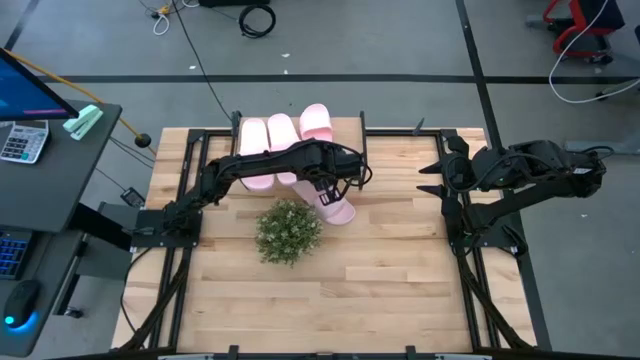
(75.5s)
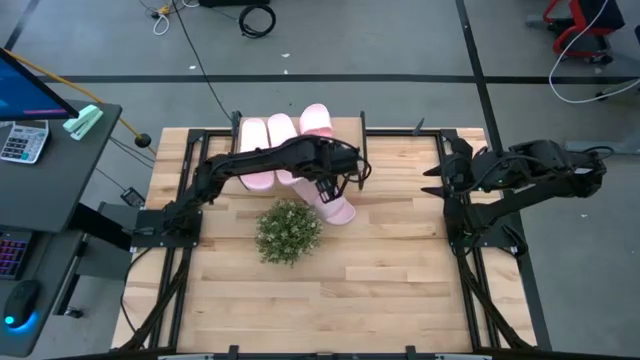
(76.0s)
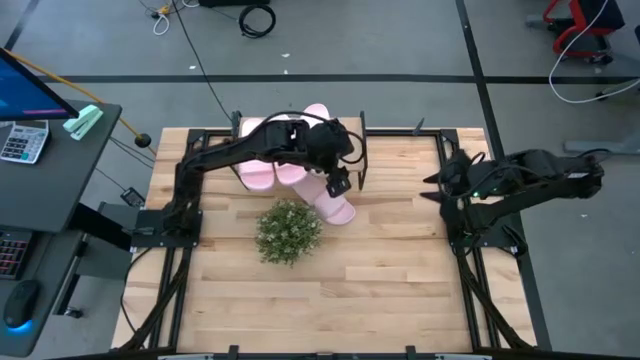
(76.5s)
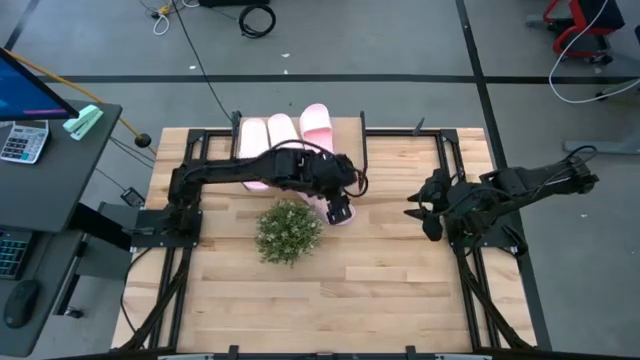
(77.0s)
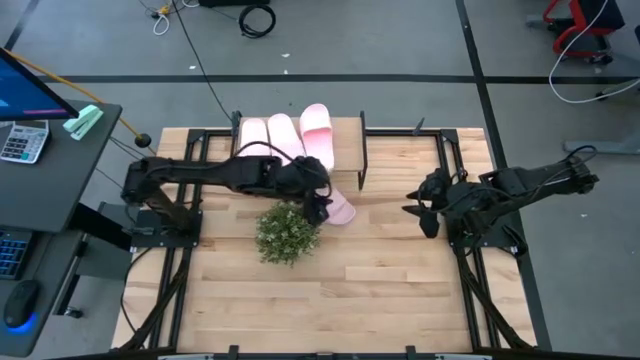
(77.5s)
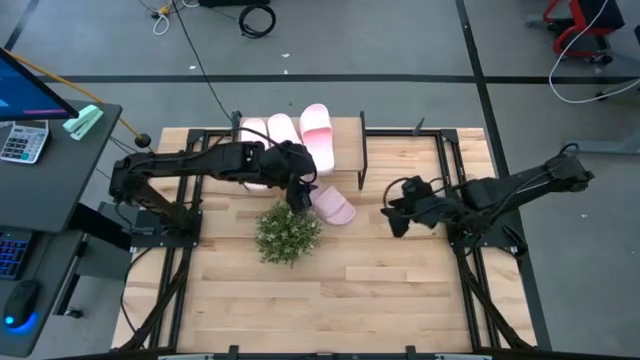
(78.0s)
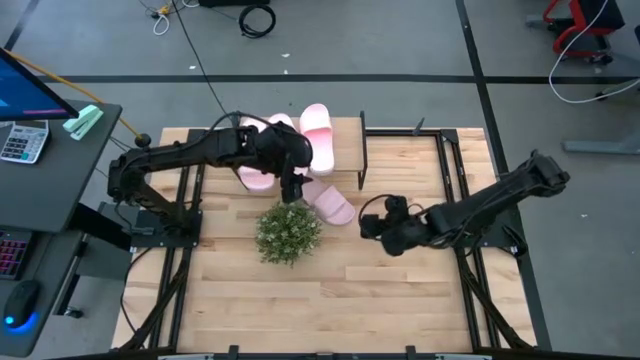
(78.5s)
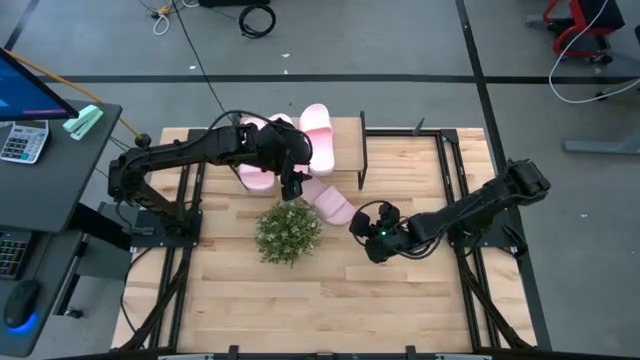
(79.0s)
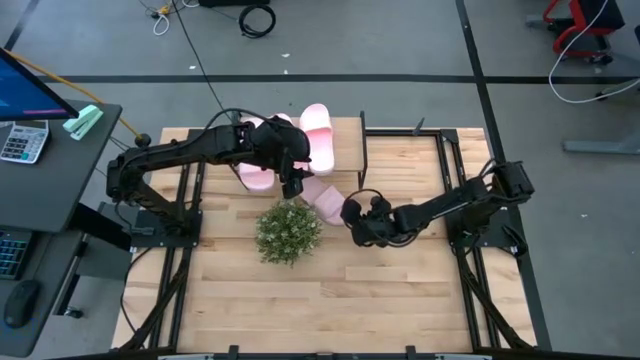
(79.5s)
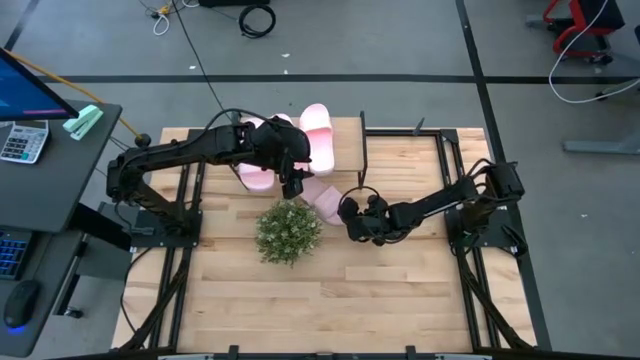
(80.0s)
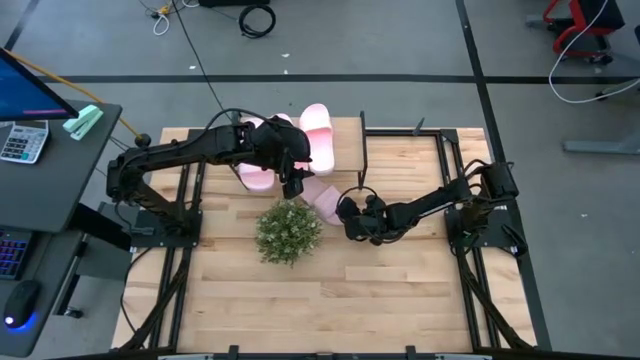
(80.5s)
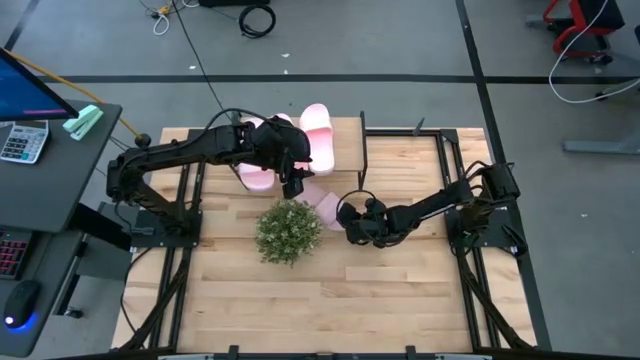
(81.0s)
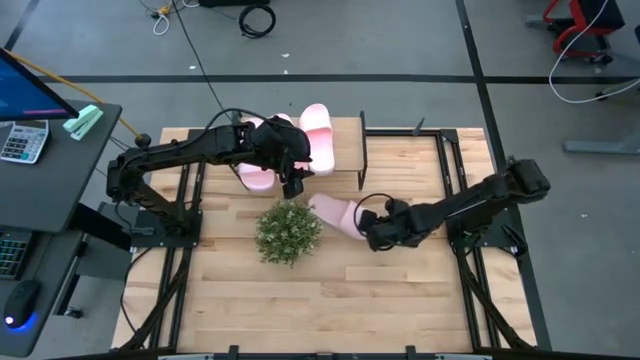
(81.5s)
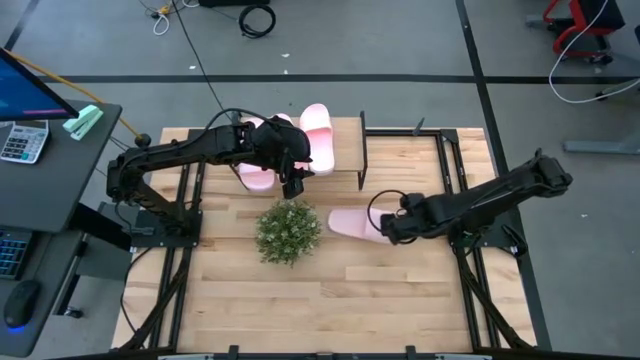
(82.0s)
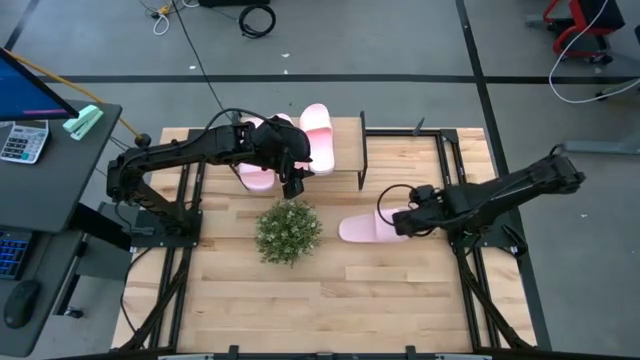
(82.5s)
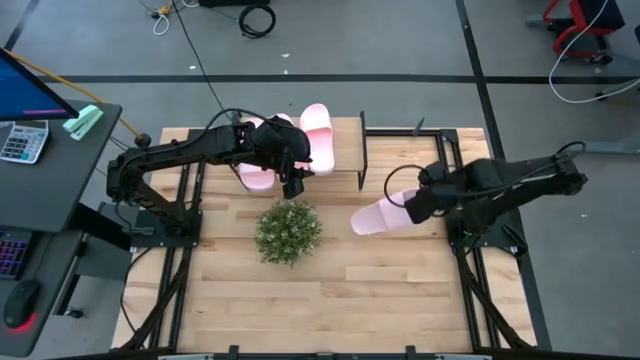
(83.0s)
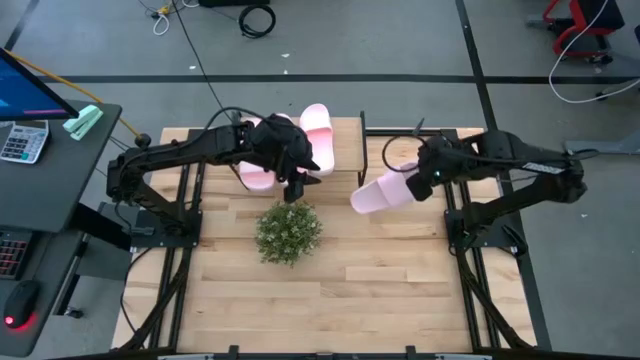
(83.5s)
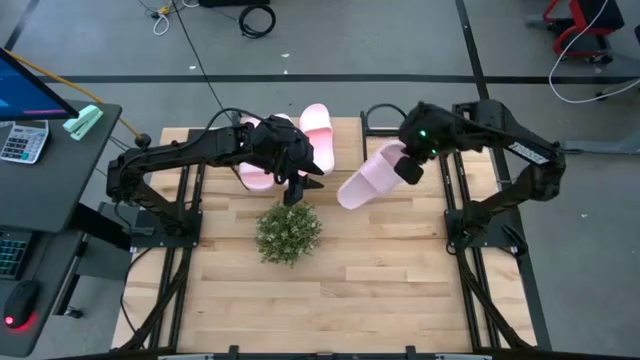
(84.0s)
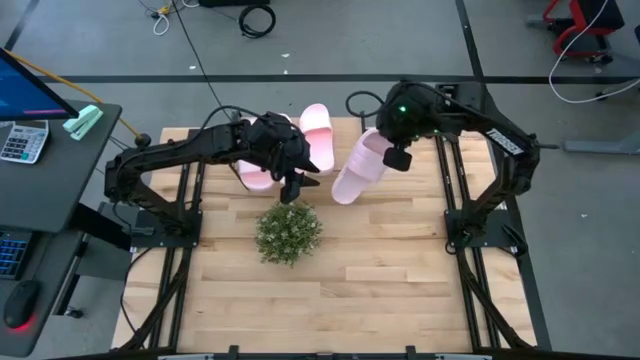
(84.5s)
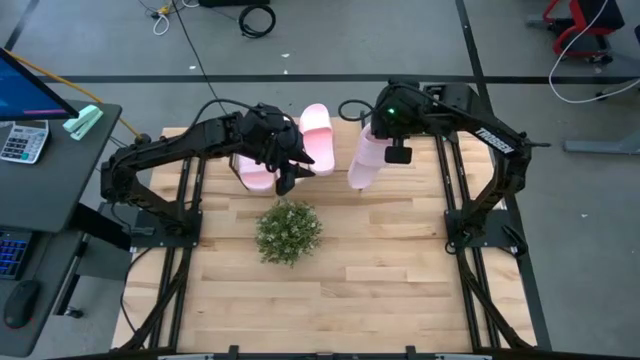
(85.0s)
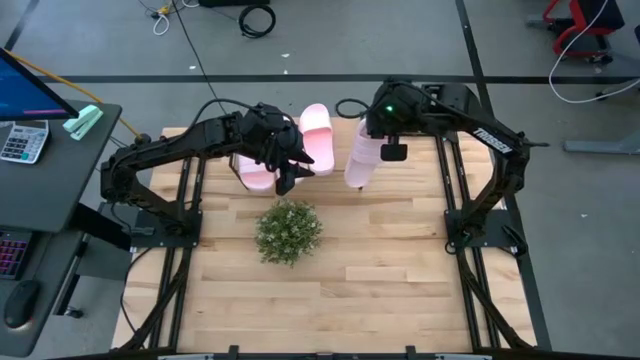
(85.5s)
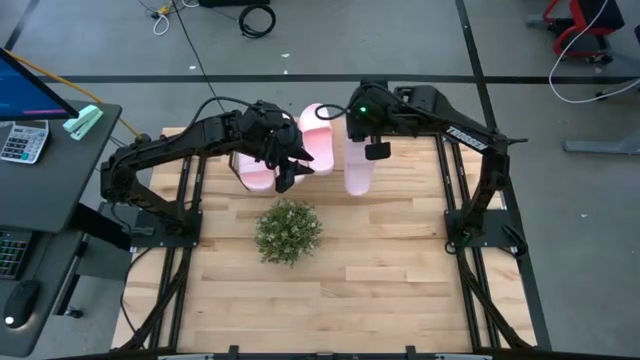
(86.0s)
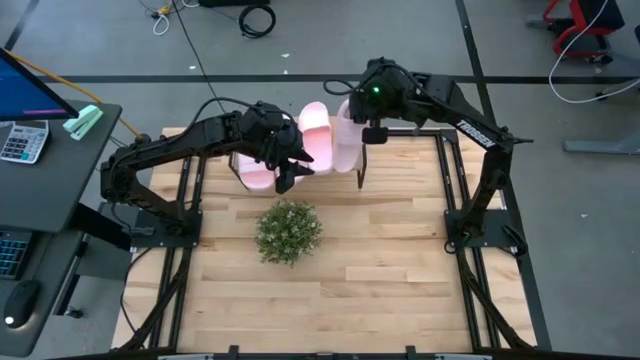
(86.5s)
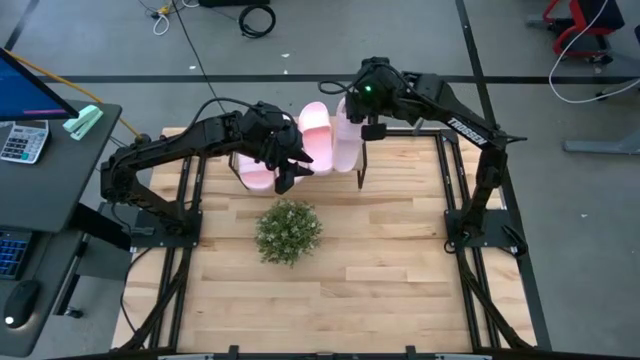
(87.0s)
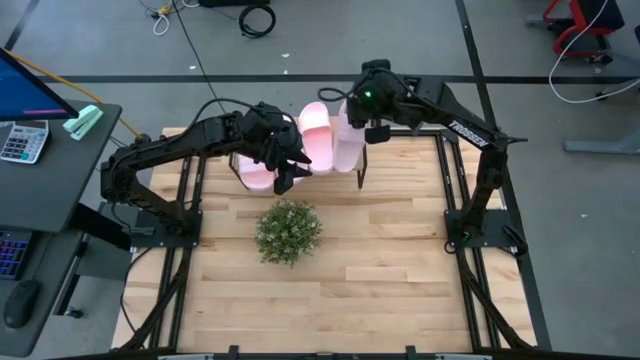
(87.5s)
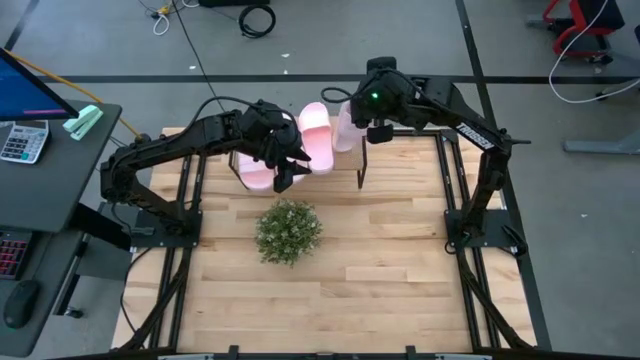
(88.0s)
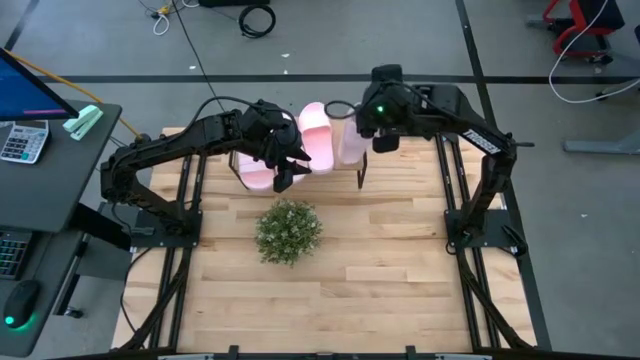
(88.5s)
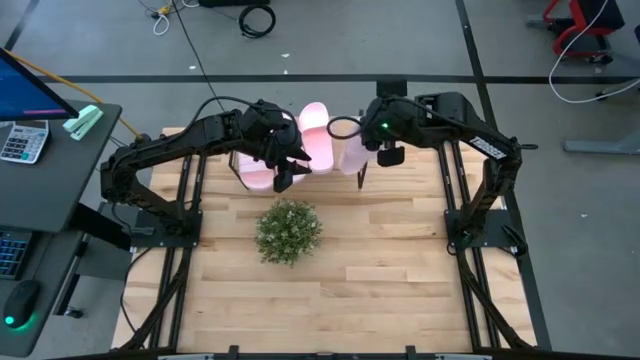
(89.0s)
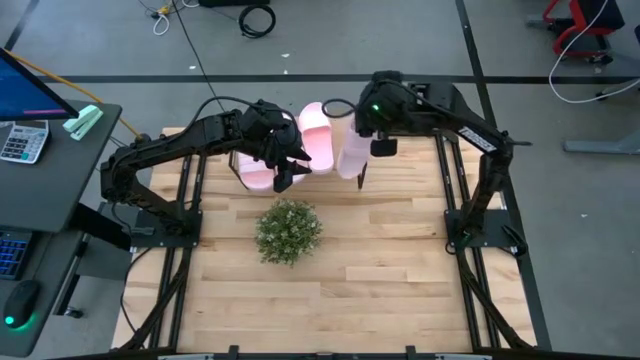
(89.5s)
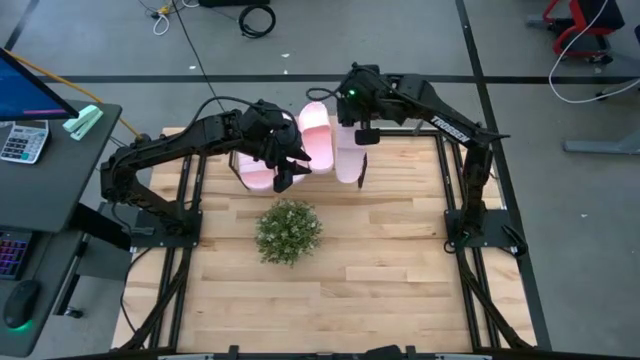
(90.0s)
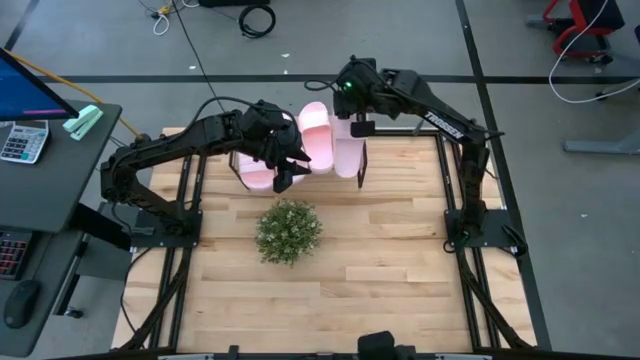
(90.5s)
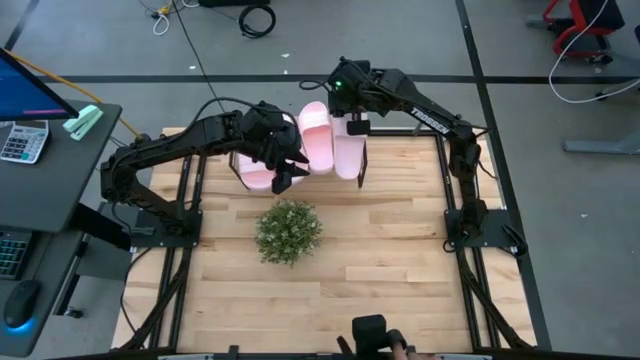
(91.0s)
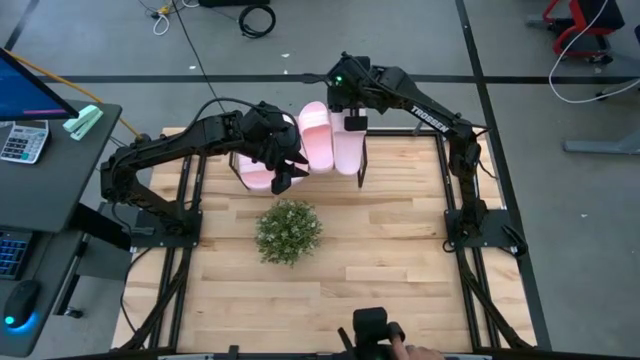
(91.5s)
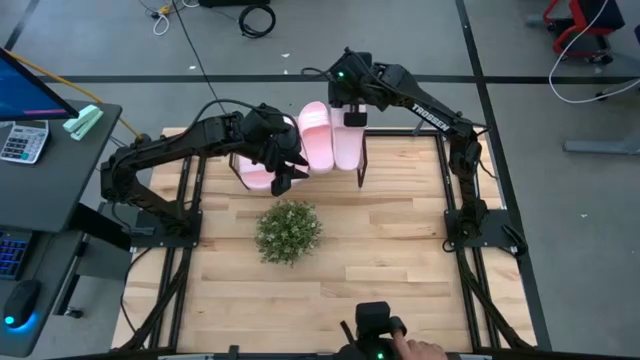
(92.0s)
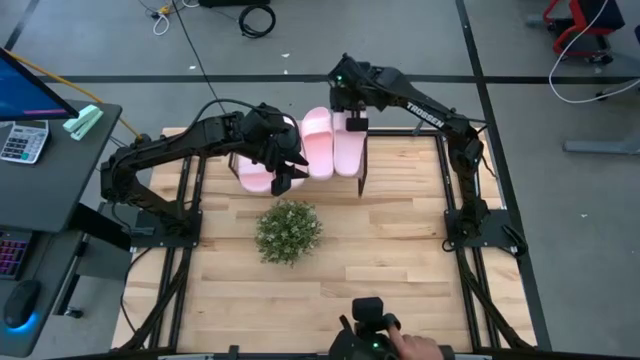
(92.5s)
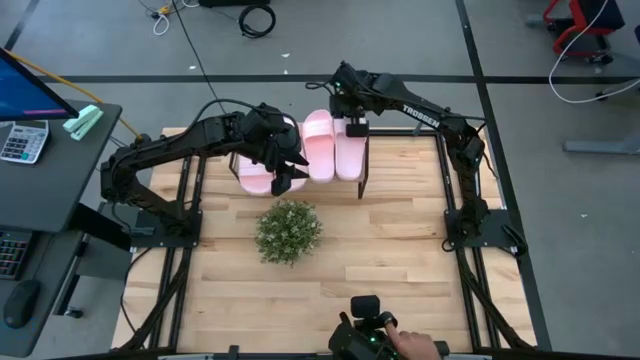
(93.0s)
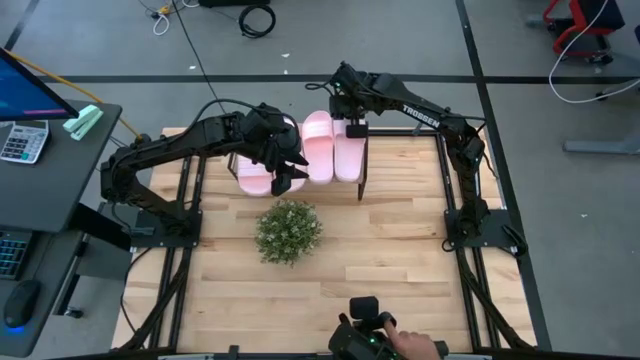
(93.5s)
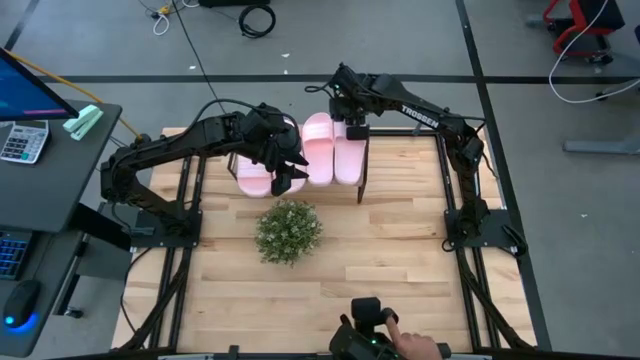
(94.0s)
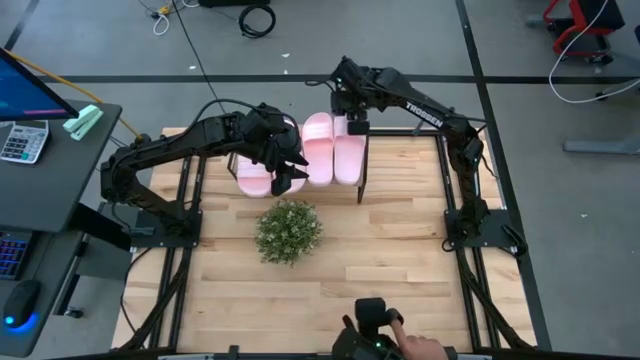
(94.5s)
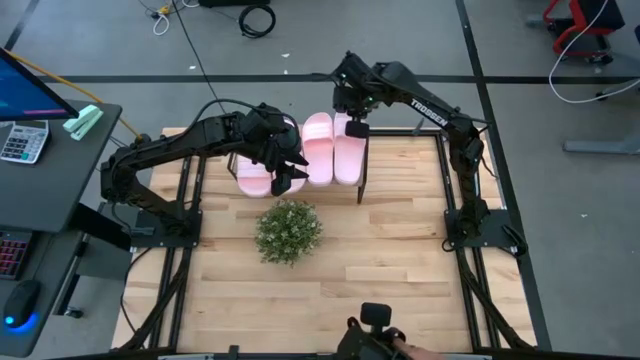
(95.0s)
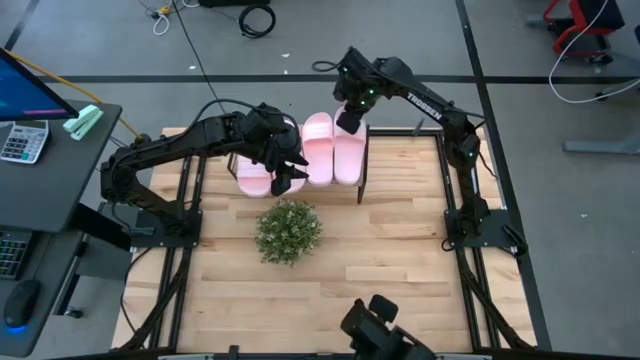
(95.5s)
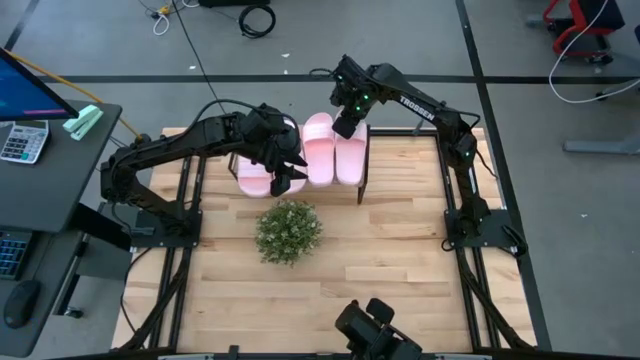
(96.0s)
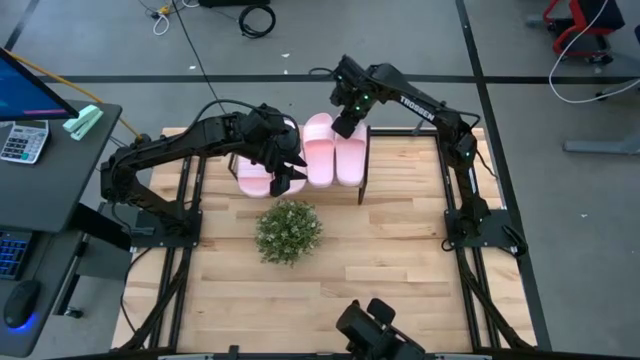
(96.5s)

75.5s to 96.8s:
Task: Pick and place slides into the shelf
Put the pink slide on the shelf
